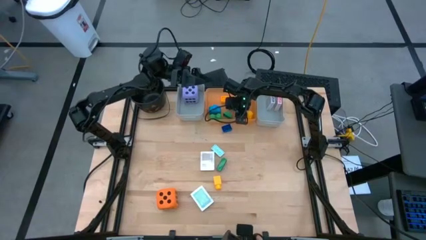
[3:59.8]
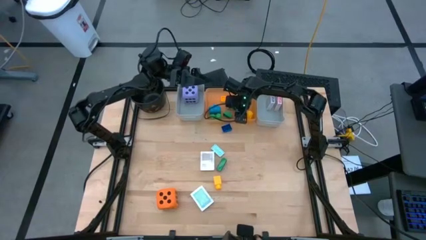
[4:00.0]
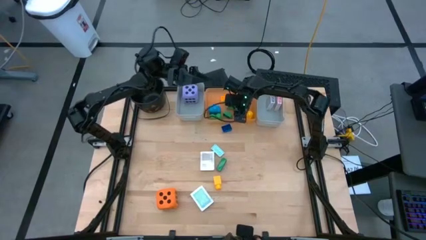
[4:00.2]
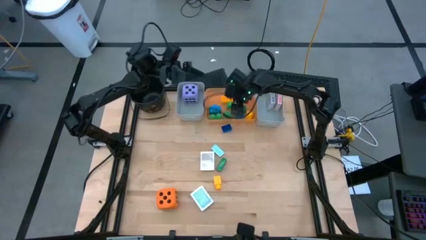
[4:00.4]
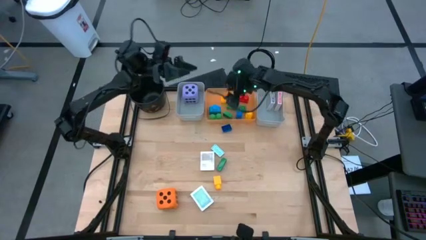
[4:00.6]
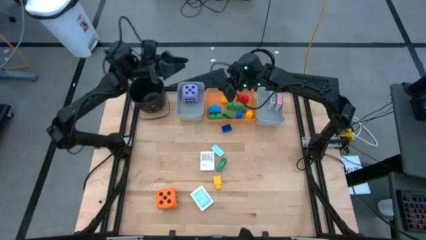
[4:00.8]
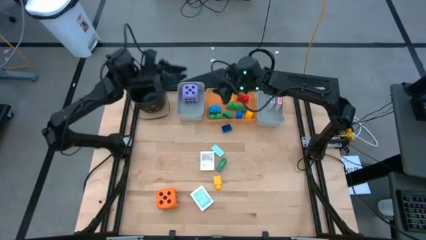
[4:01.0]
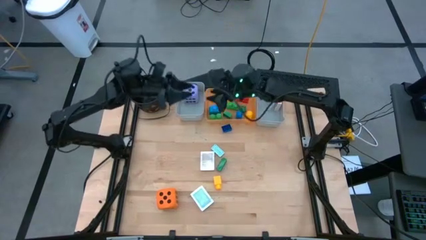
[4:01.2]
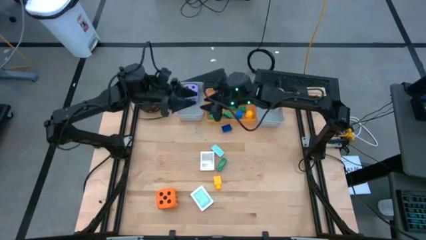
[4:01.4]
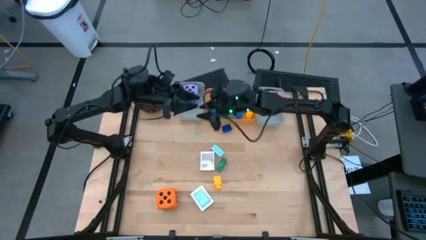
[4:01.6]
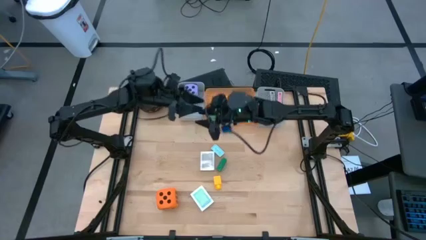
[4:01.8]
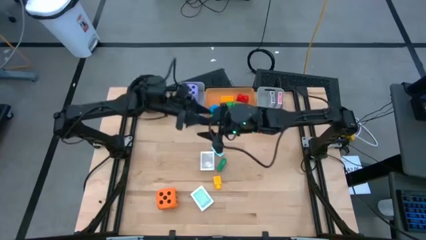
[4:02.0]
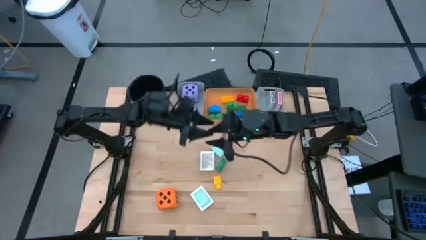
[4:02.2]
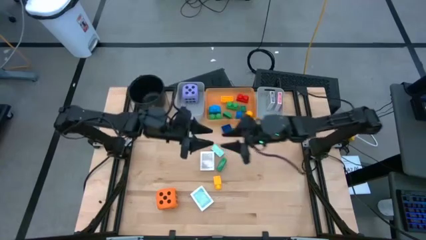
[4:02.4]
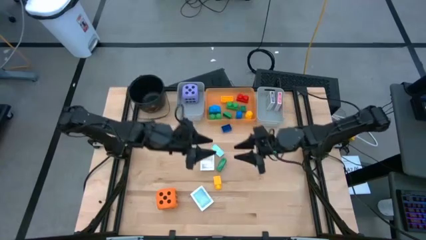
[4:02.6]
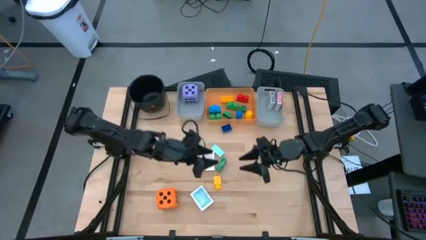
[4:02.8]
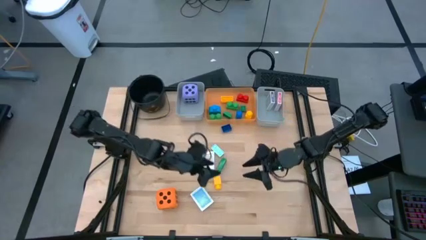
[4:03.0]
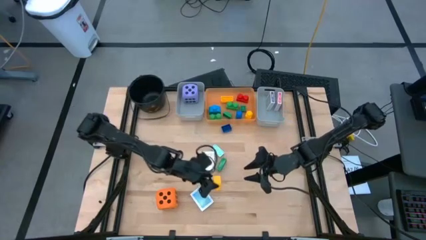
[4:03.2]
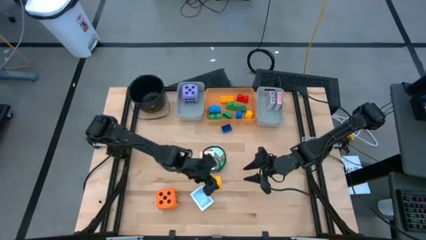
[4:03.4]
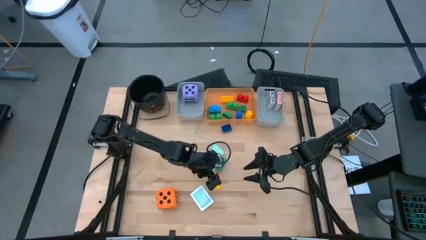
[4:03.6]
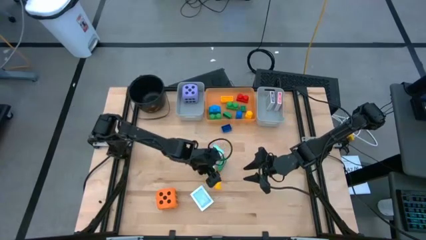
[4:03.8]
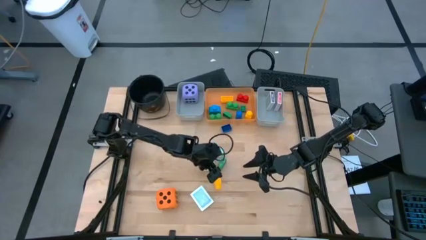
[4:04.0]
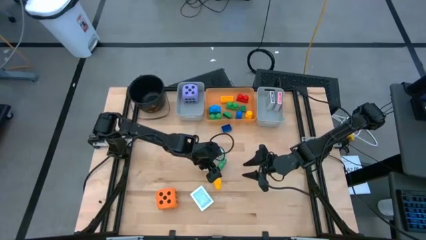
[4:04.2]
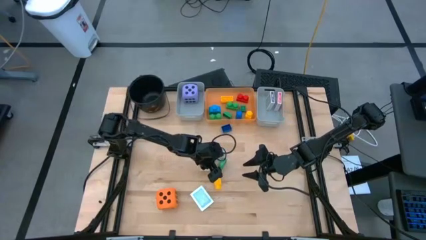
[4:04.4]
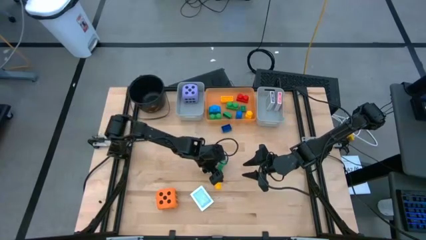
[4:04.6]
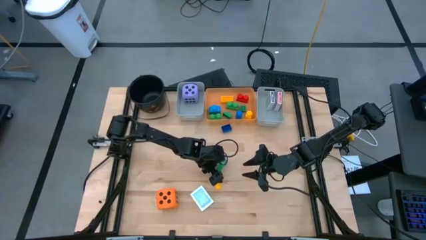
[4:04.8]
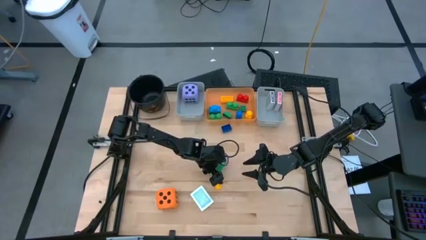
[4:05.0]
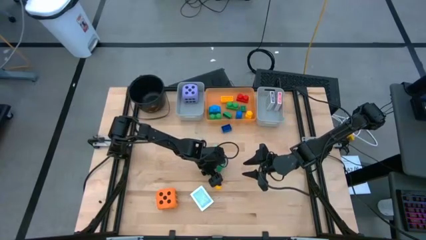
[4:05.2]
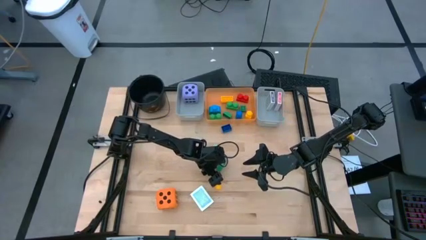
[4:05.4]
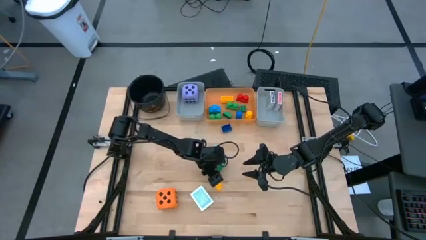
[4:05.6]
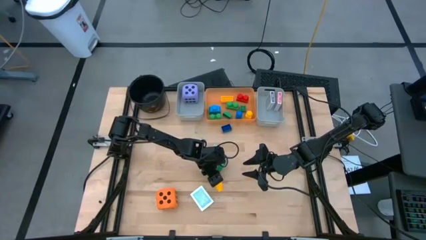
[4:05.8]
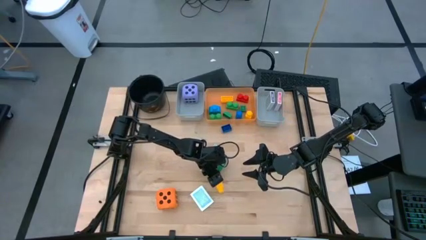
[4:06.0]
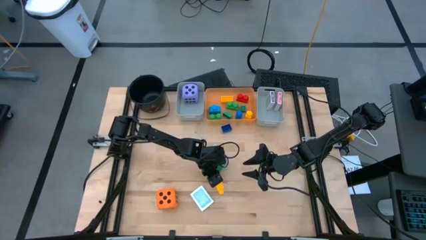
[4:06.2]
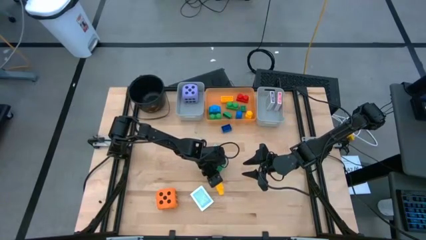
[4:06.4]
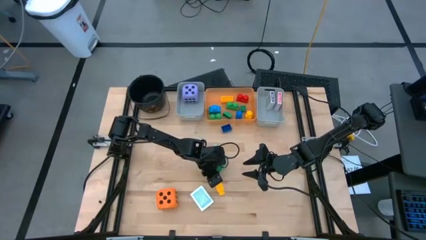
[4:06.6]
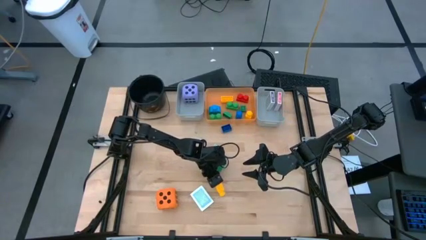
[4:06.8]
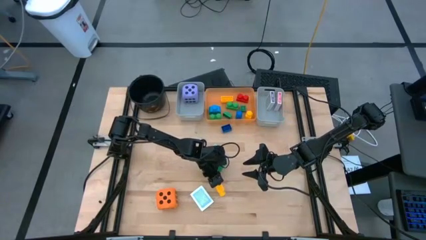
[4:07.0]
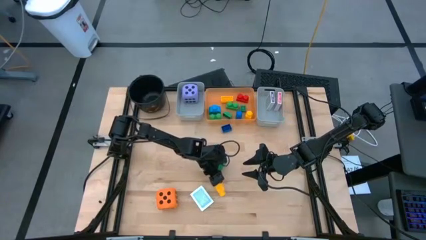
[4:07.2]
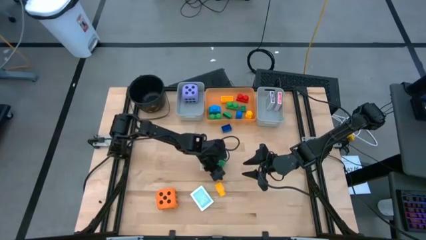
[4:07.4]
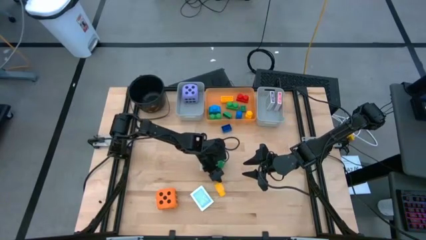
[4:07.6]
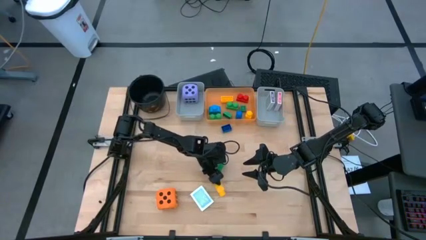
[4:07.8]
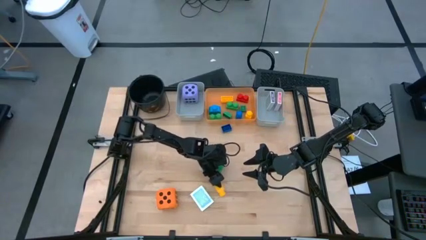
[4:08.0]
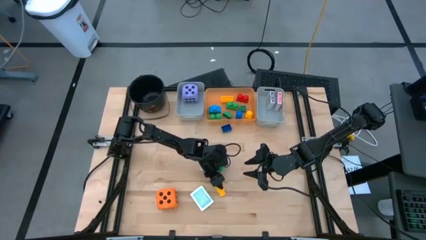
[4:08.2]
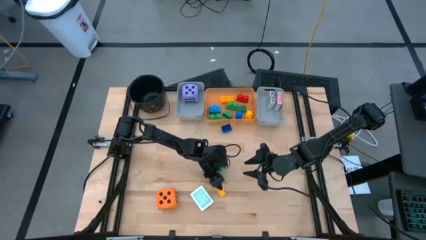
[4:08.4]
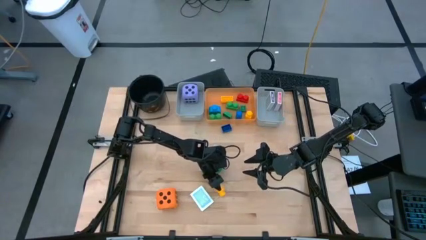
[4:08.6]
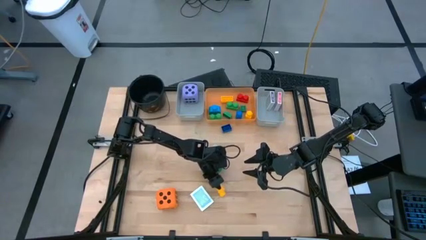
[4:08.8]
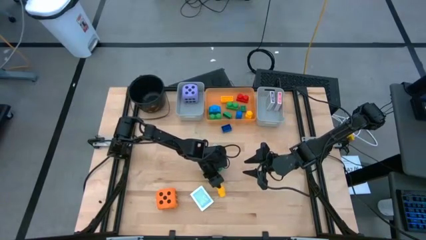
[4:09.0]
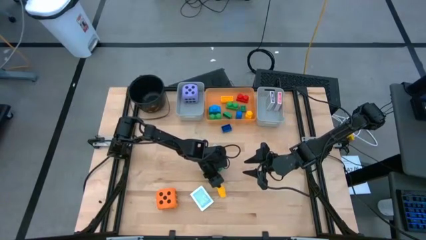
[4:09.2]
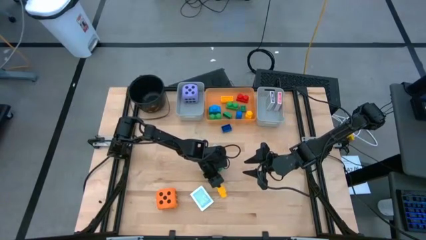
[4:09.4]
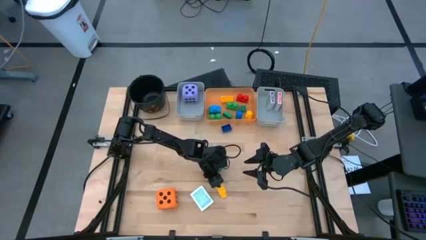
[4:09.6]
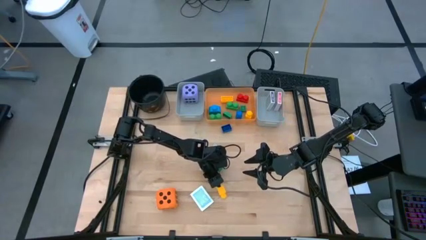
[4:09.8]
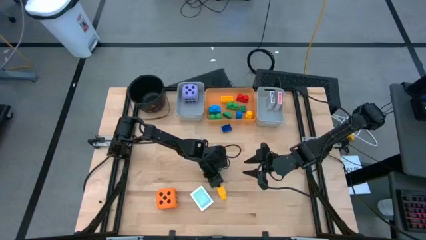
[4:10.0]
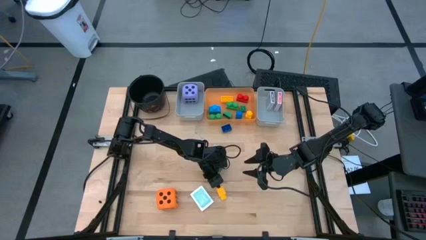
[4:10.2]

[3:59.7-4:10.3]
Task: Pick & Place Toys
Put the yellow game piece into the orange bin
